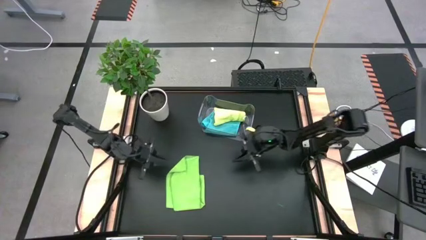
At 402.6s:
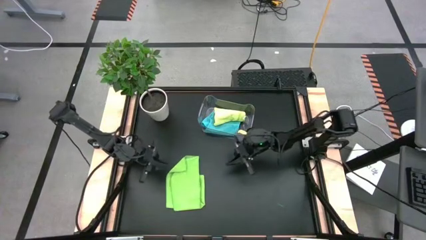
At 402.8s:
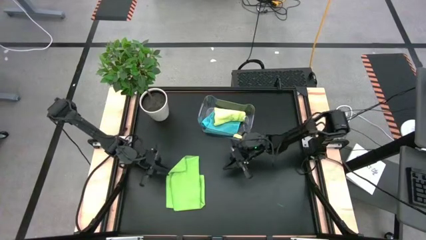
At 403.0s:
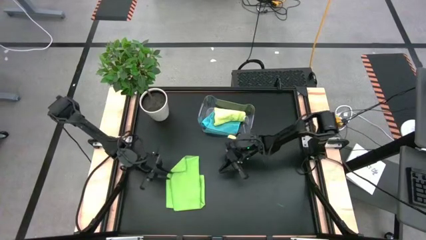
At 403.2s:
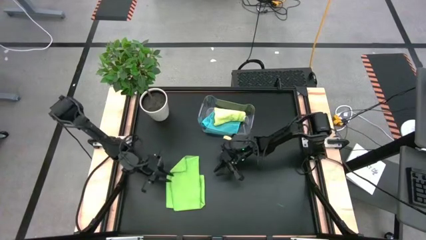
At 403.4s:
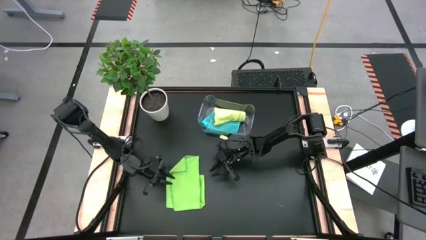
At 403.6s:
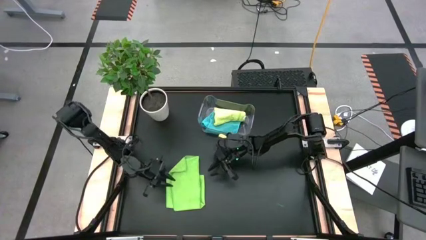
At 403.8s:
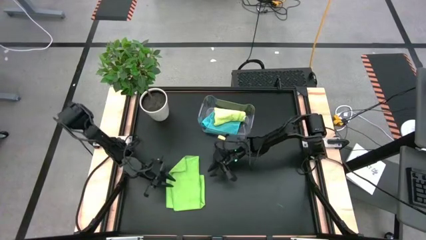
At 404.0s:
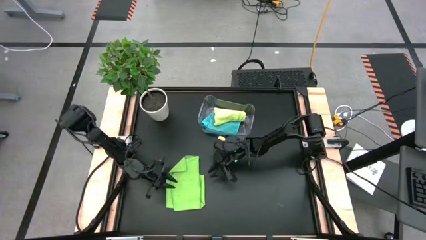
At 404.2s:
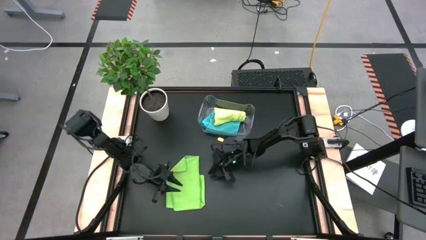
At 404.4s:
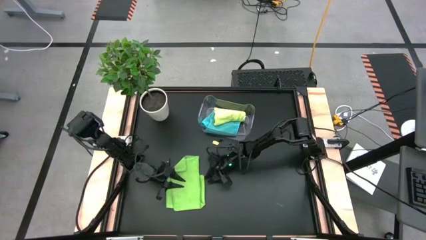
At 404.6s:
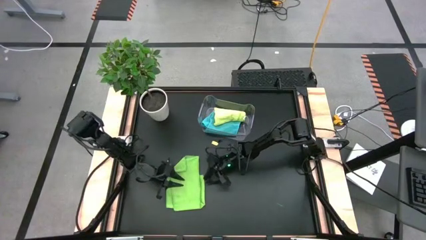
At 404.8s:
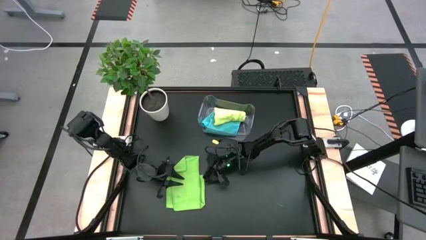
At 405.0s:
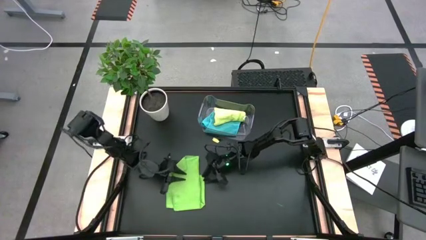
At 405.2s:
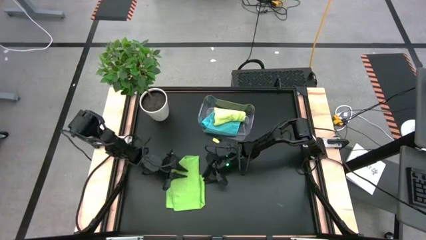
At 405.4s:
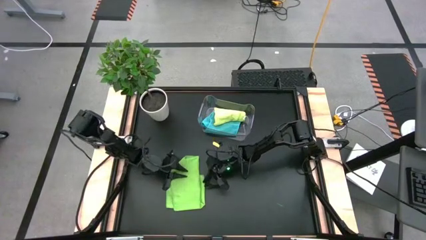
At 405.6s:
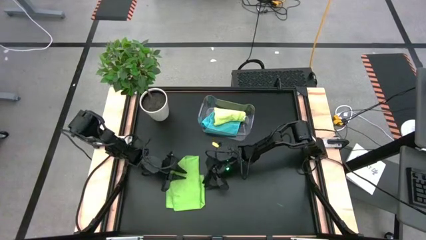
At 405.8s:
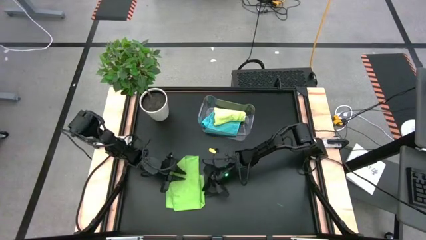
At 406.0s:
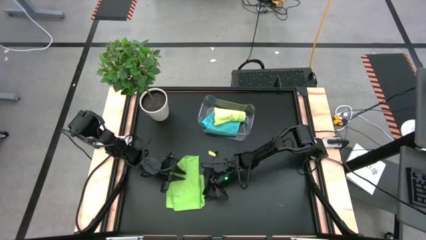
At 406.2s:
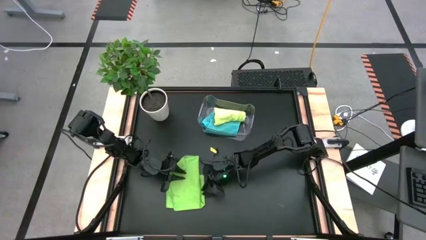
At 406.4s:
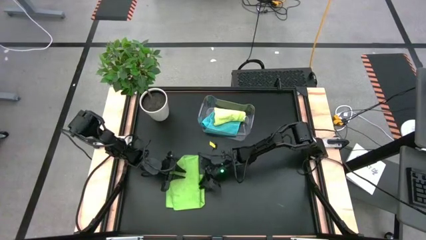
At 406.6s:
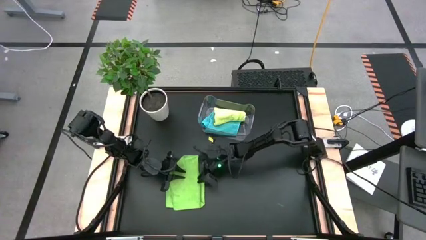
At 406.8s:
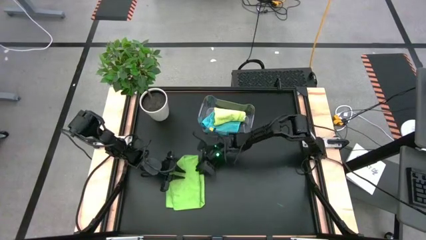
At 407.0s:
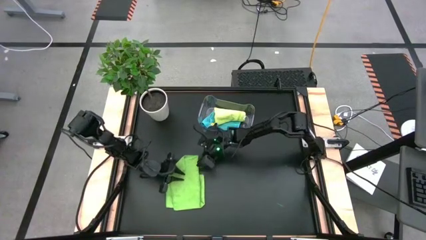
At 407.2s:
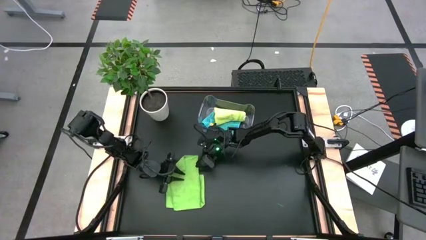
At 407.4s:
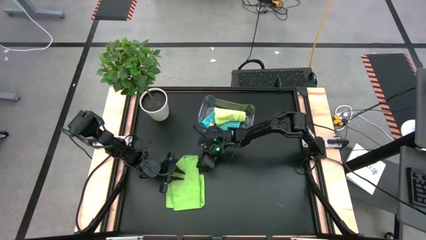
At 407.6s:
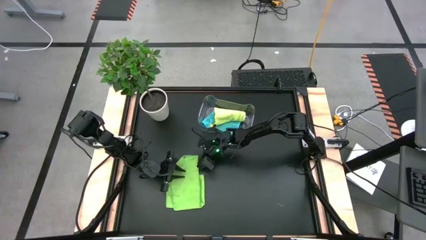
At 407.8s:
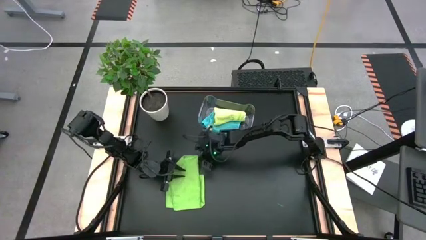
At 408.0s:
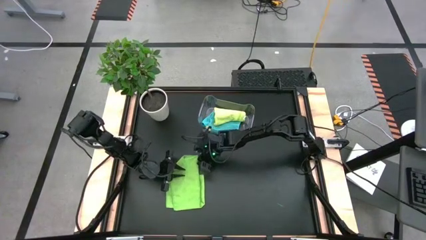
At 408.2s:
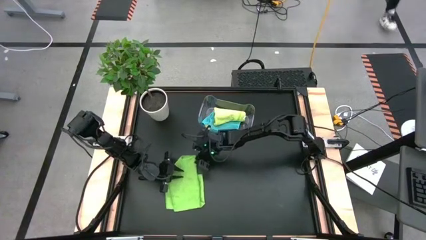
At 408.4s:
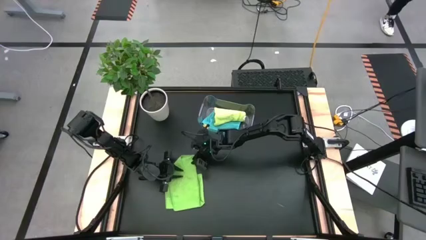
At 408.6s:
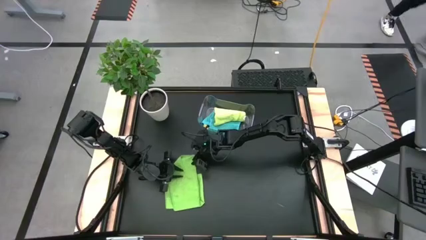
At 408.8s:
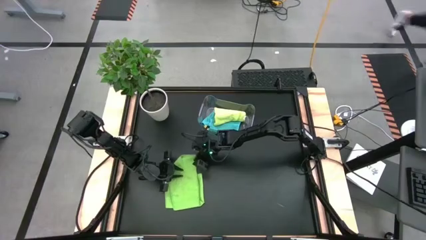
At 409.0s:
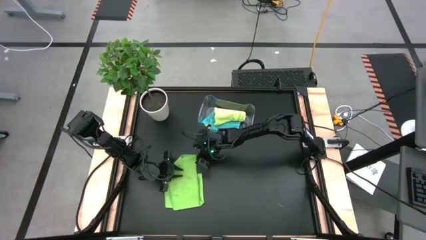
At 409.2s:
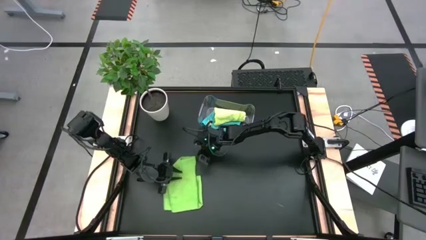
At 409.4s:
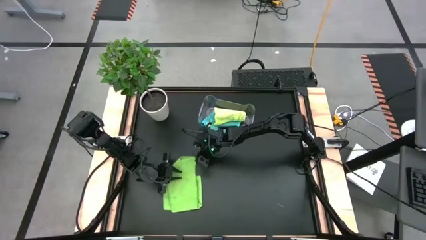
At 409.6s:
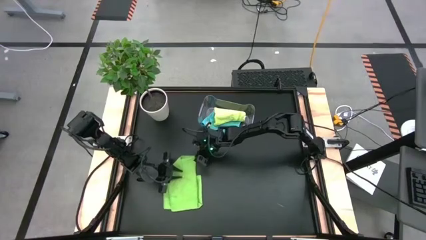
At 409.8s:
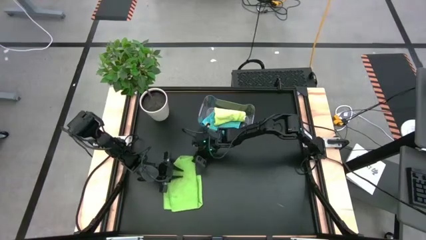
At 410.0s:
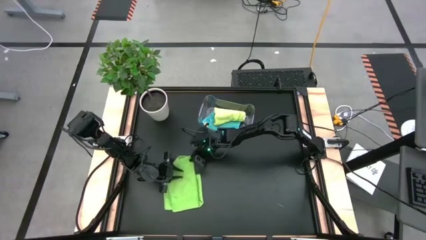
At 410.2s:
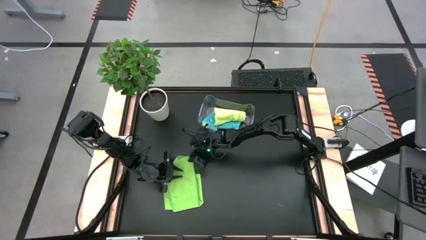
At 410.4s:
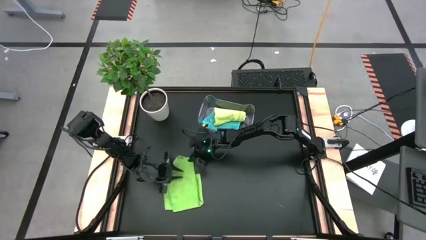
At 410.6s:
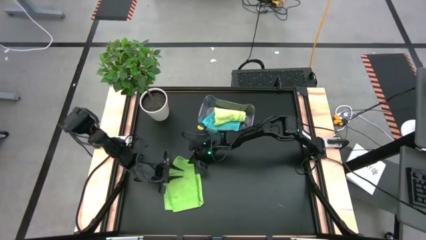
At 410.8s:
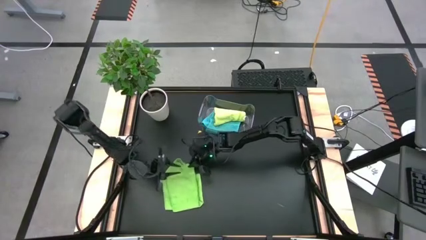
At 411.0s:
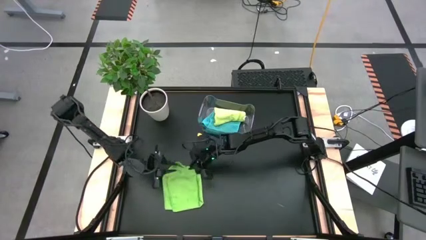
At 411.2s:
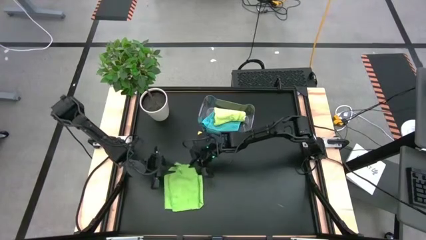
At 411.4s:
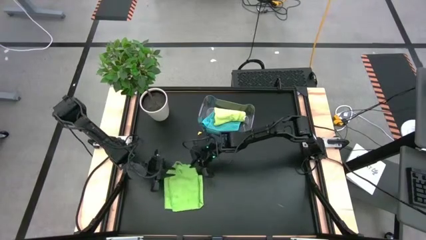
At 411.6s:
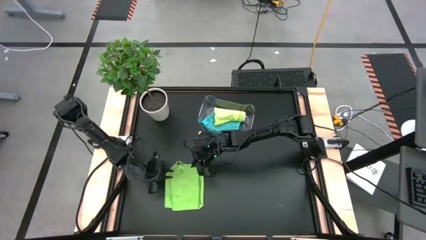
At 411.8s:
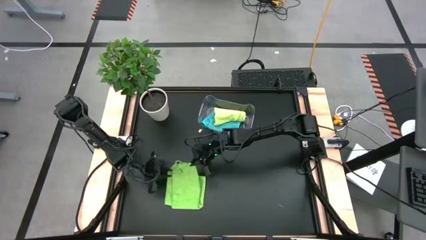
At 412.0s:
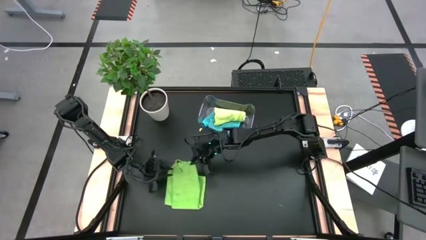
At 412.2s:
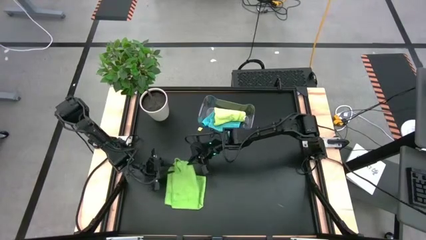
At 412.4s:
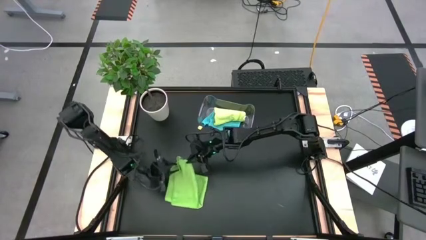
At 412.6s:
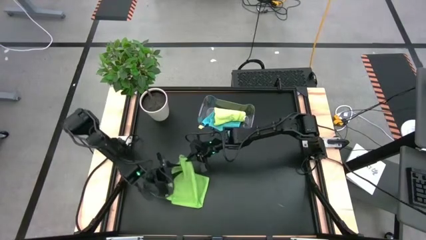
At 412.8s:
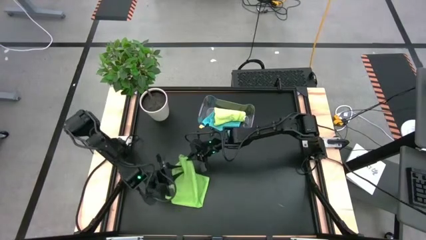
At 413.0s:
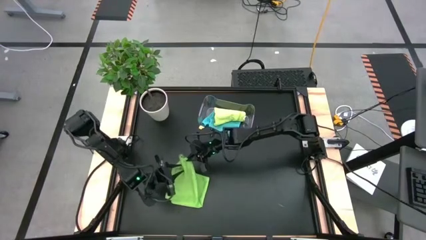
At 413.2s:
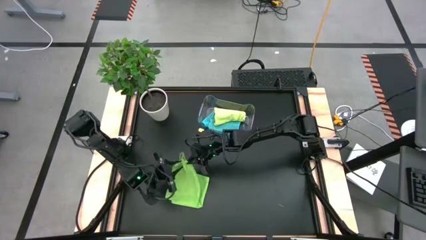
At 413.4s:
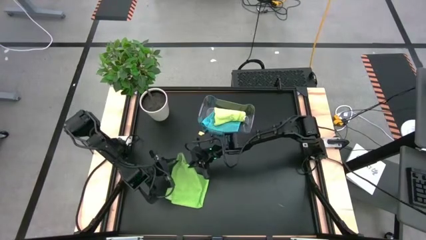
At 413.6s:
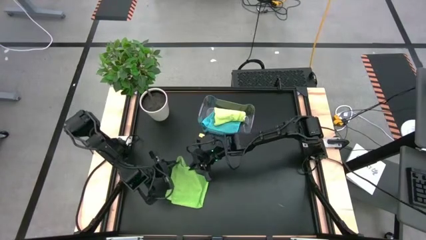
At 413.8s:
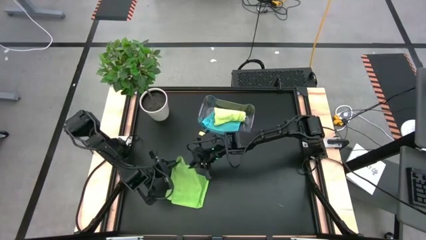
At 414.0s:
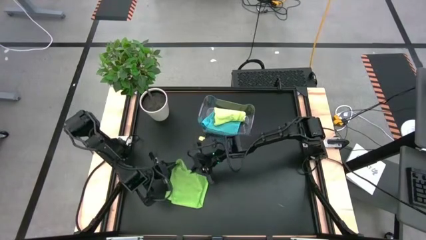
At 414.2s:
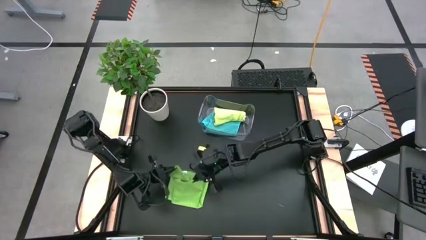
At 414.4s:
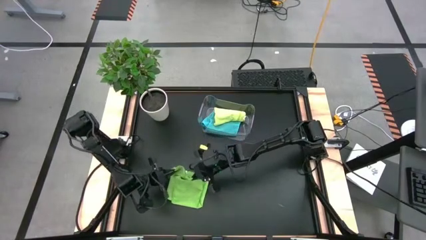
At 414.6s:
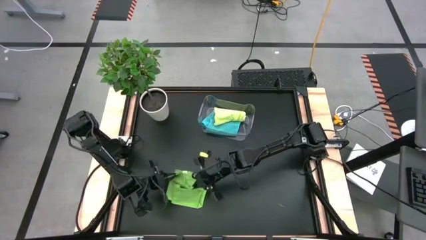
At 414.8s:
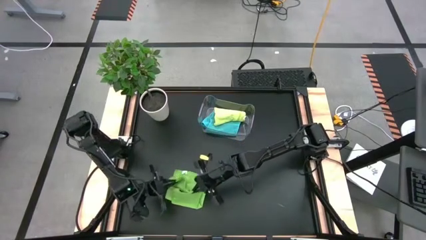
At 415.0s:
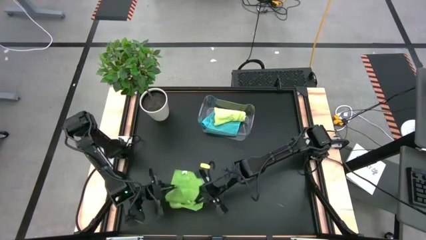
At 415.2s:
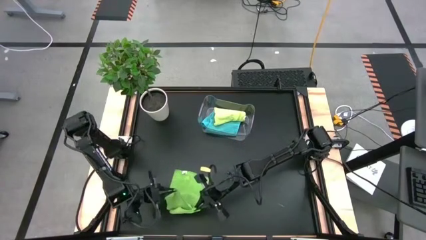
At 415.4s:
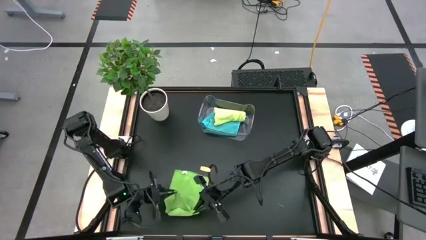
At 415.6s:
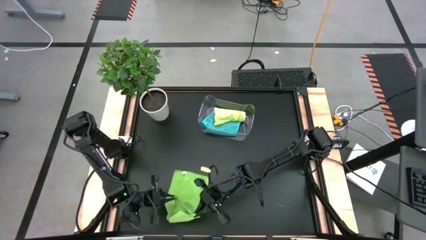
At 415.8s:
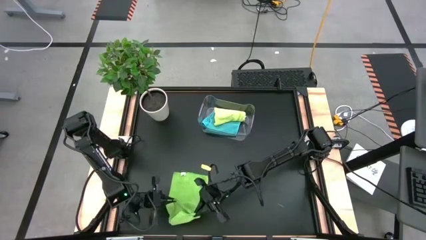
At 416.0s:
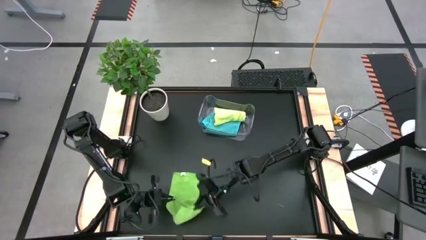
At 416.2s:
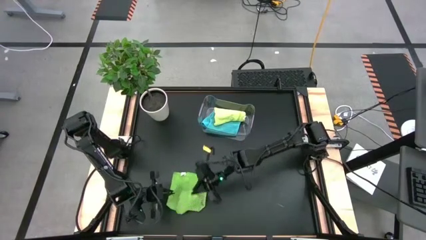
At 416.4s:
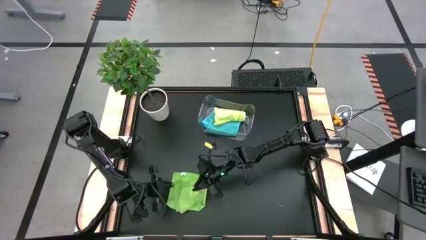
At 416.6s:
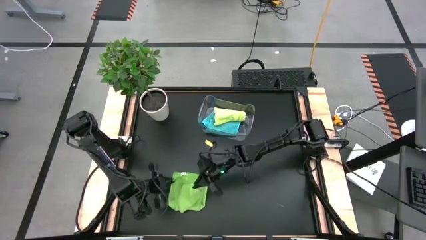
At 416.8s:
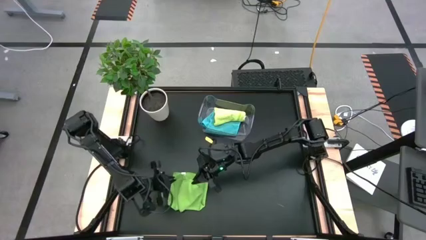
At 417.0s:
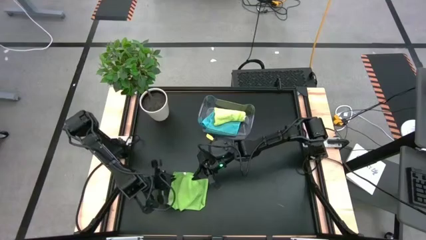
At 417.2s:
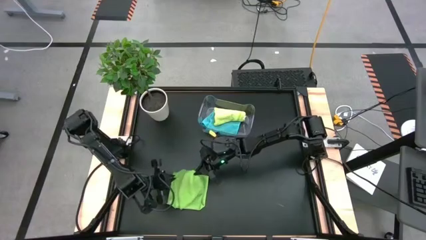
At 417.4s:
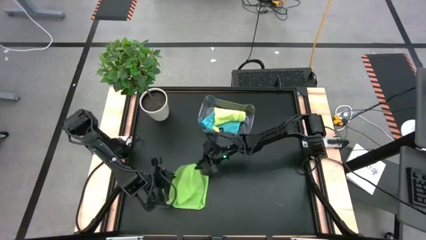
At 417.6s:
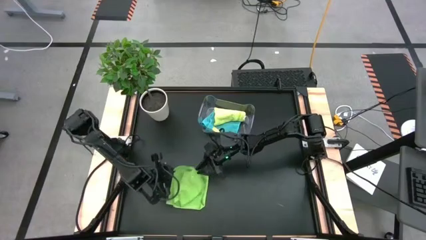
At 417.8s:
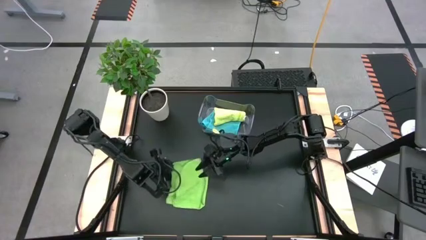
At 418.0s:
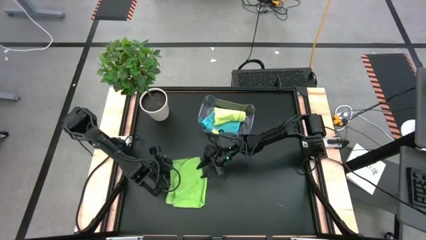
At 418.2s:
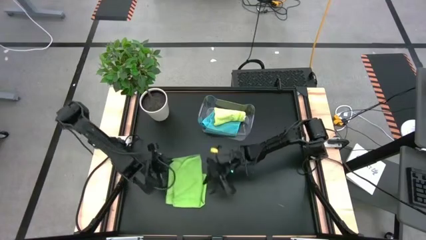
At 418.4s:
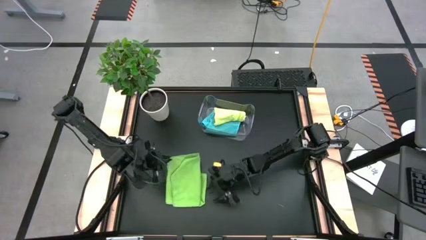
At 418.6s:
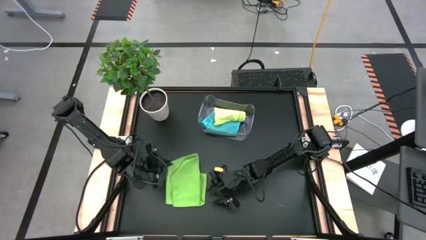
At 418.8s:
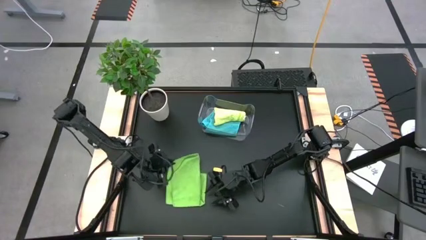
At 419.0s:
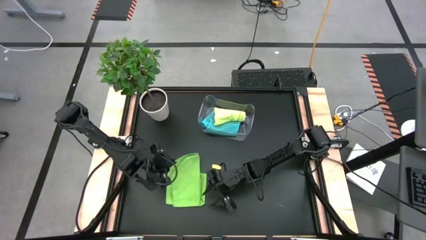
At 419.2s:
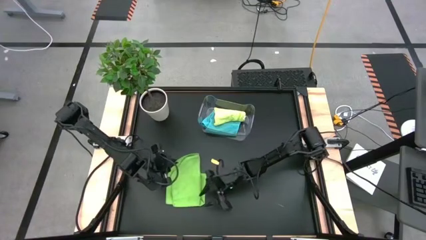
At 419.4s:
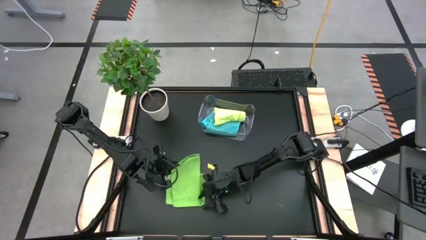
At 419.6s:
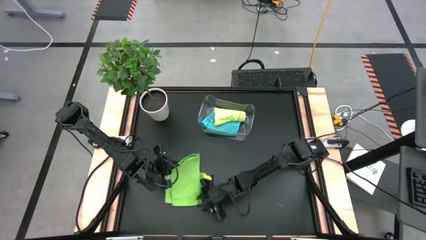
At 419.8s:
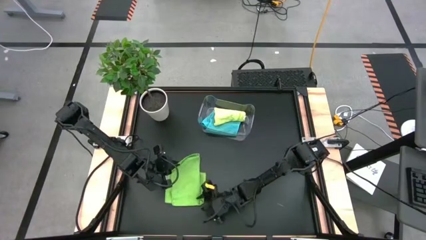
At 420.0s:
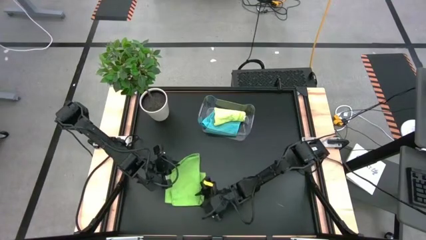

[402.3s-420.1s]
Task: Fold microfiber towels
Fold the green towel
